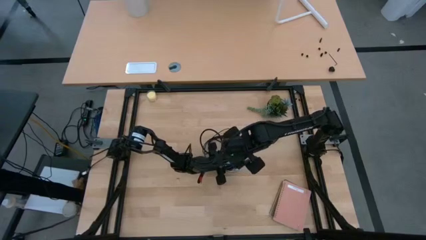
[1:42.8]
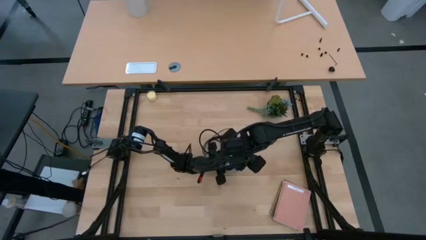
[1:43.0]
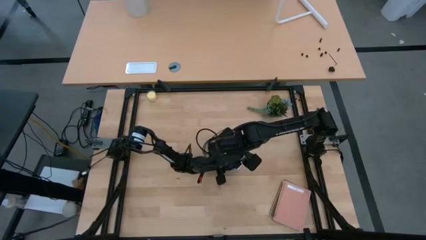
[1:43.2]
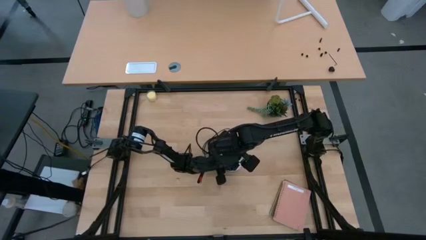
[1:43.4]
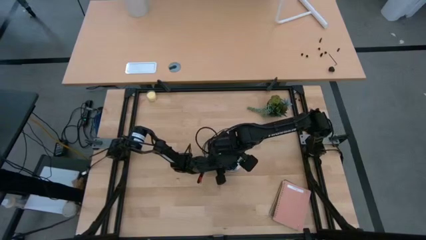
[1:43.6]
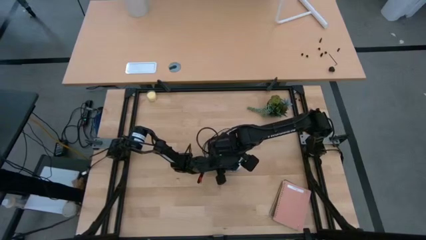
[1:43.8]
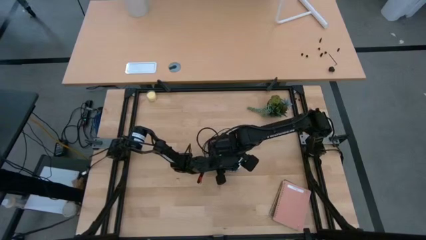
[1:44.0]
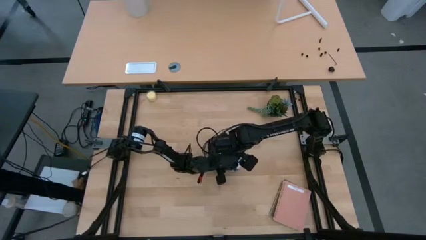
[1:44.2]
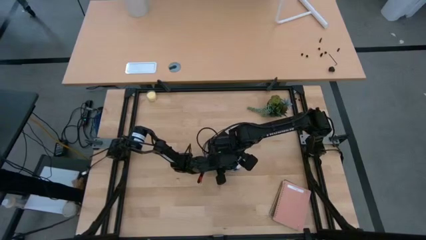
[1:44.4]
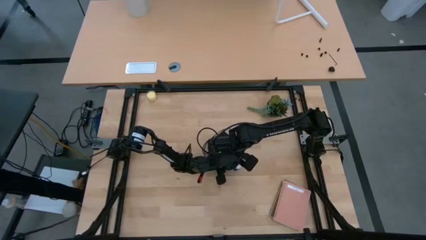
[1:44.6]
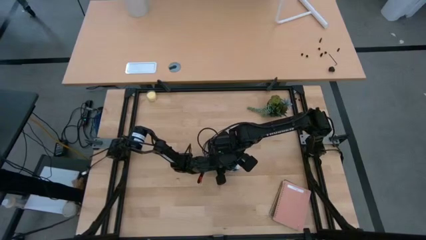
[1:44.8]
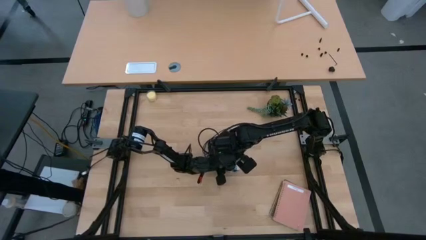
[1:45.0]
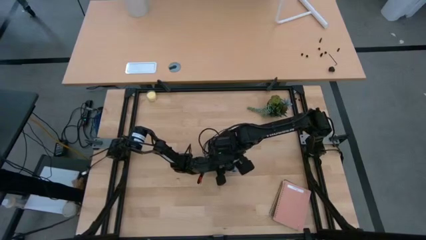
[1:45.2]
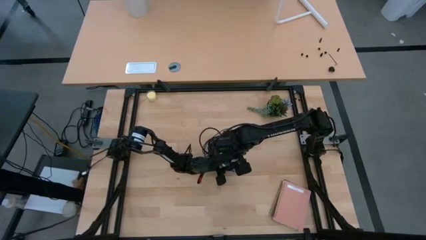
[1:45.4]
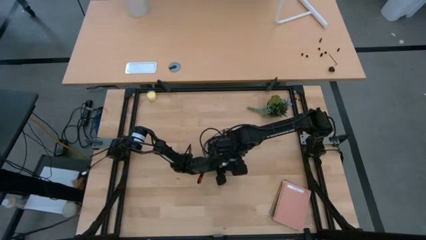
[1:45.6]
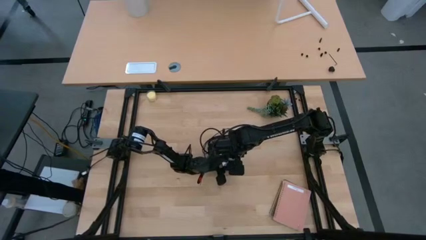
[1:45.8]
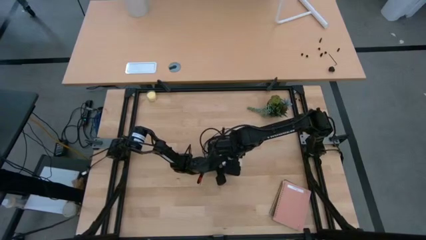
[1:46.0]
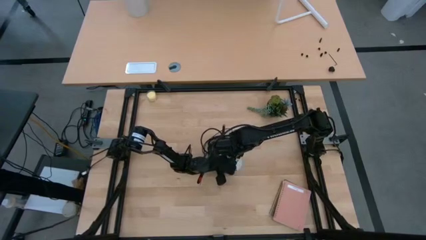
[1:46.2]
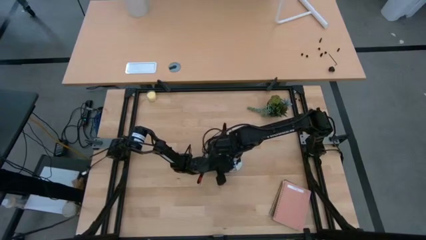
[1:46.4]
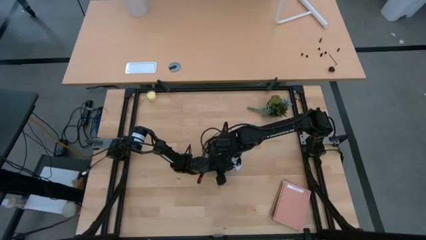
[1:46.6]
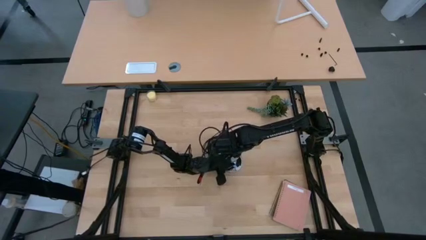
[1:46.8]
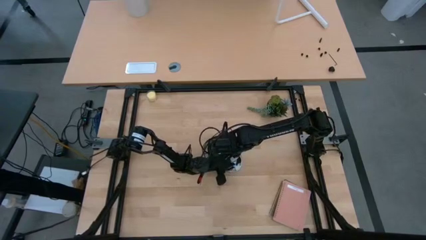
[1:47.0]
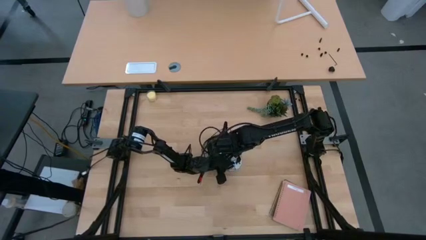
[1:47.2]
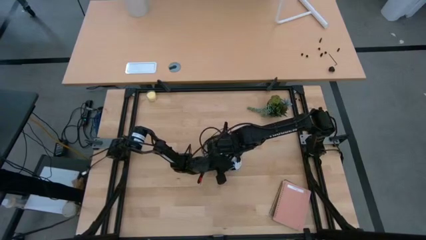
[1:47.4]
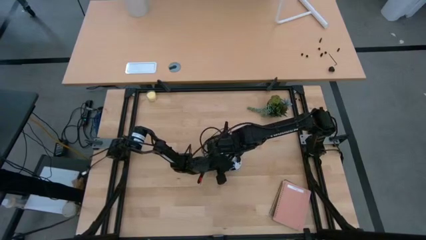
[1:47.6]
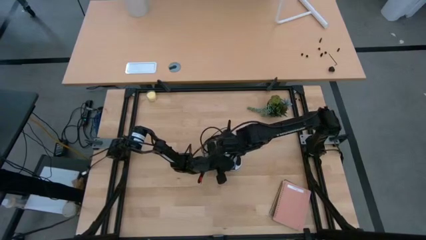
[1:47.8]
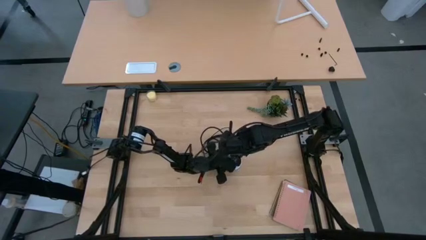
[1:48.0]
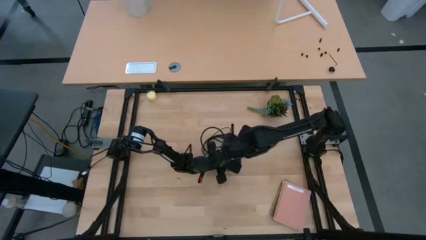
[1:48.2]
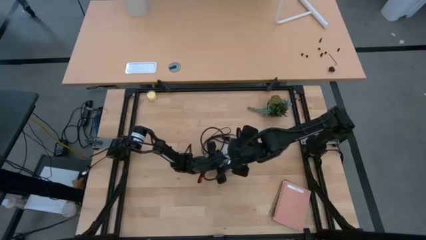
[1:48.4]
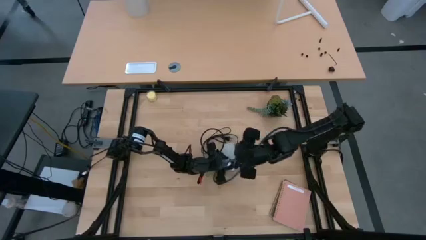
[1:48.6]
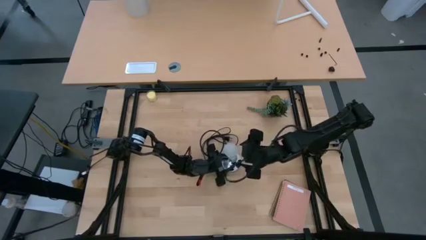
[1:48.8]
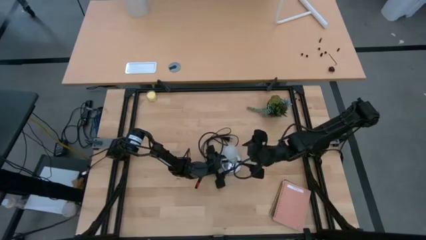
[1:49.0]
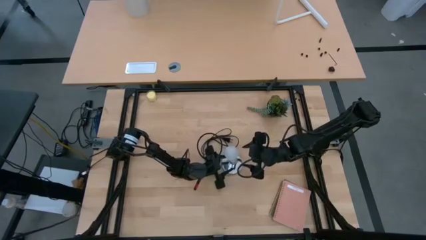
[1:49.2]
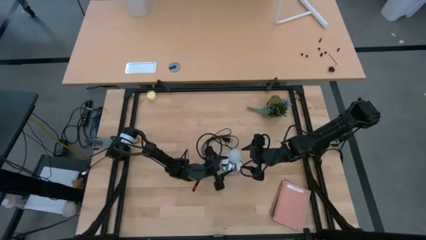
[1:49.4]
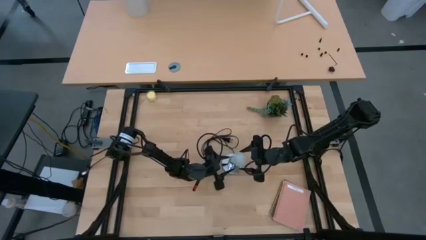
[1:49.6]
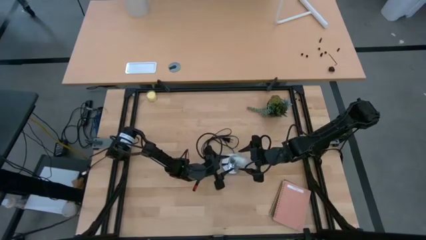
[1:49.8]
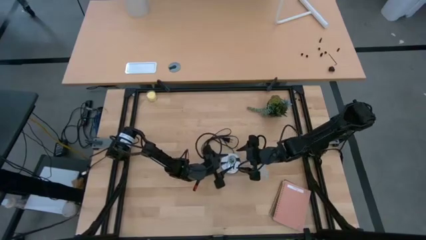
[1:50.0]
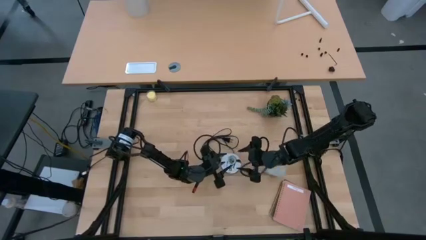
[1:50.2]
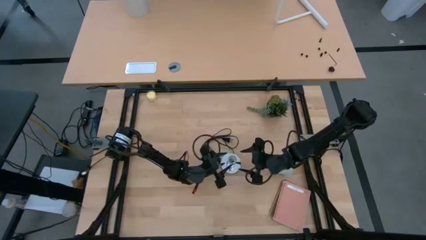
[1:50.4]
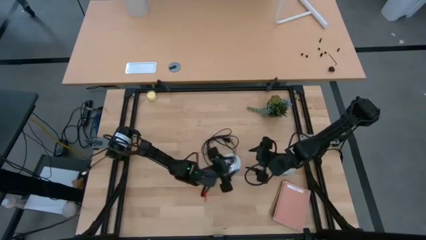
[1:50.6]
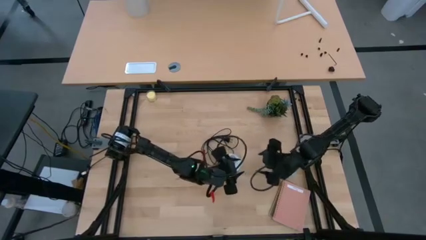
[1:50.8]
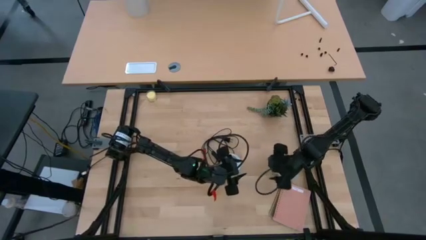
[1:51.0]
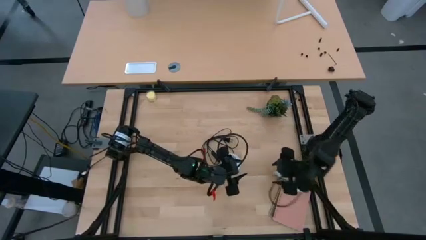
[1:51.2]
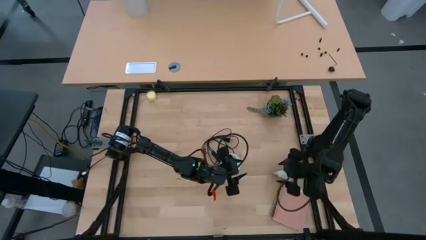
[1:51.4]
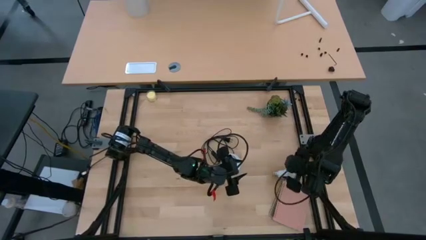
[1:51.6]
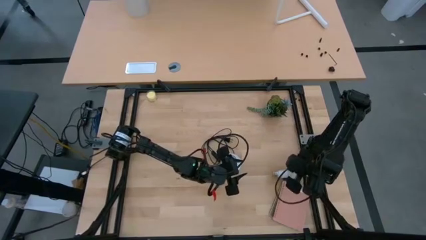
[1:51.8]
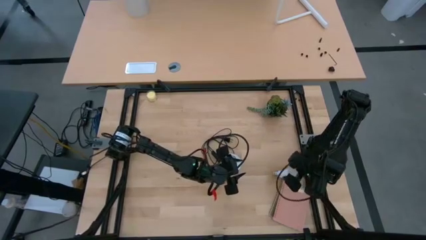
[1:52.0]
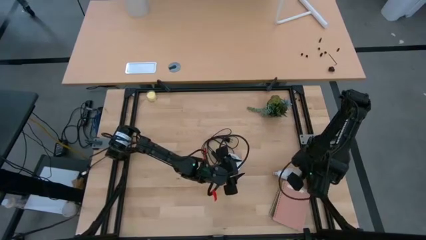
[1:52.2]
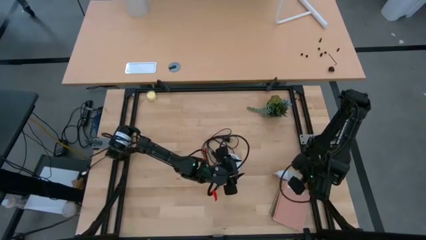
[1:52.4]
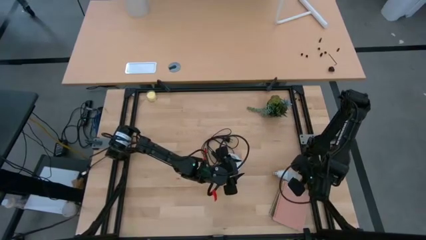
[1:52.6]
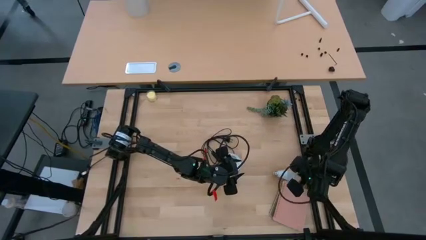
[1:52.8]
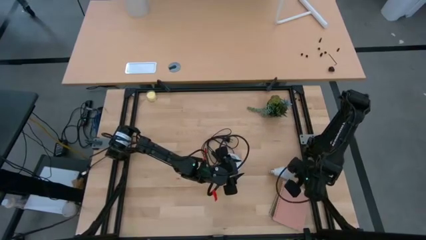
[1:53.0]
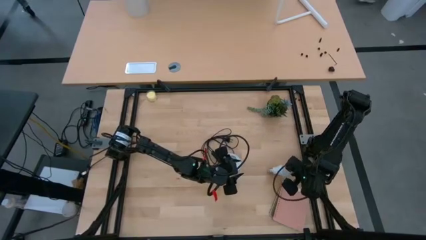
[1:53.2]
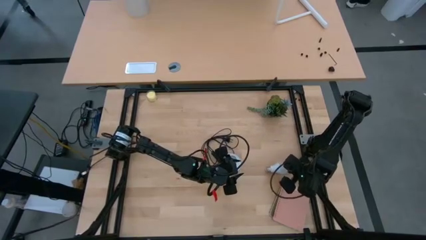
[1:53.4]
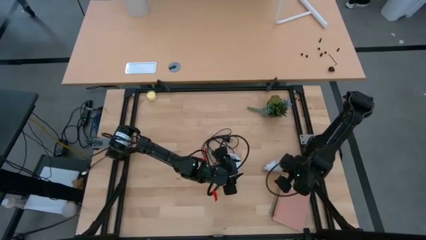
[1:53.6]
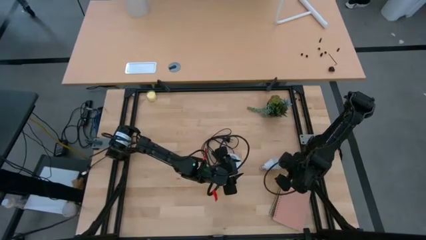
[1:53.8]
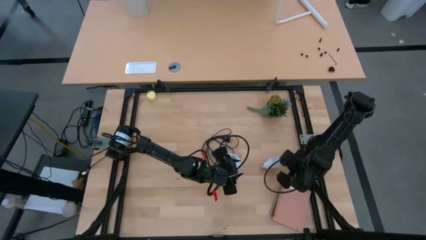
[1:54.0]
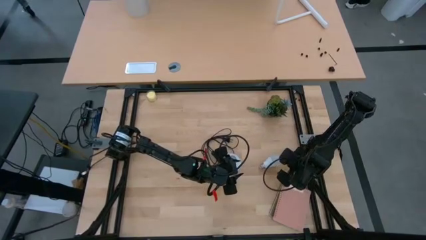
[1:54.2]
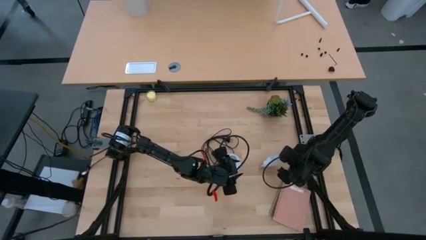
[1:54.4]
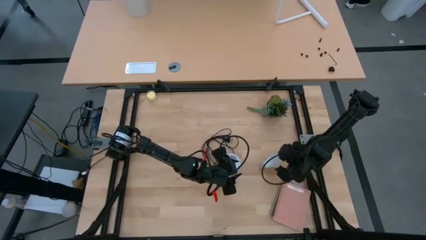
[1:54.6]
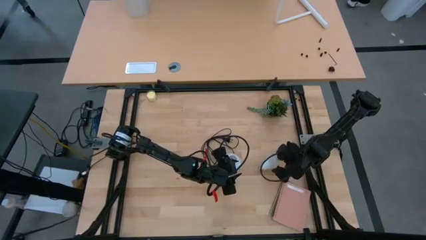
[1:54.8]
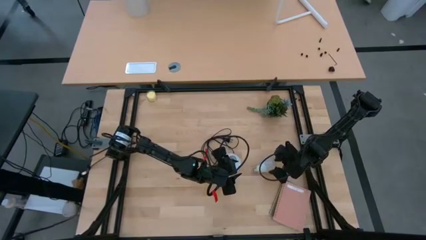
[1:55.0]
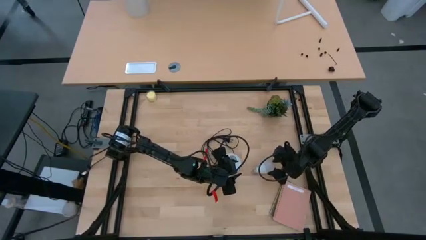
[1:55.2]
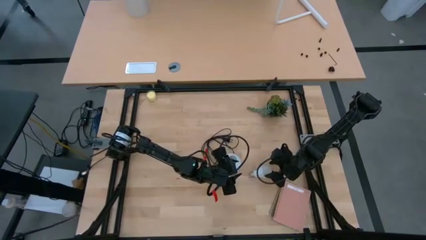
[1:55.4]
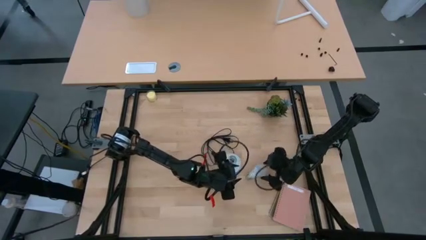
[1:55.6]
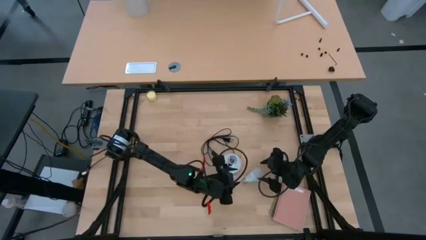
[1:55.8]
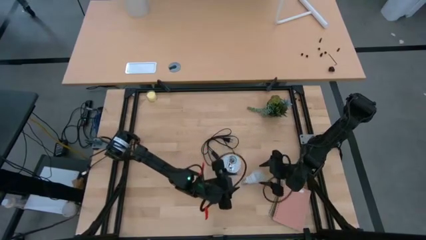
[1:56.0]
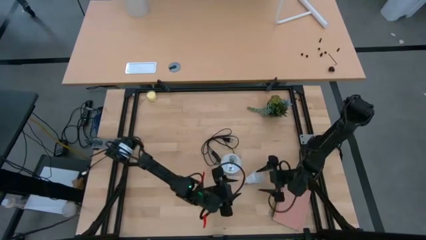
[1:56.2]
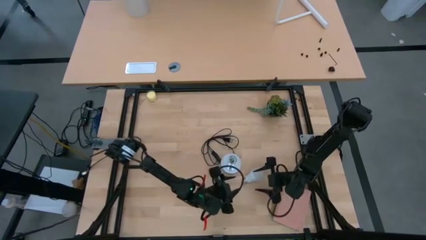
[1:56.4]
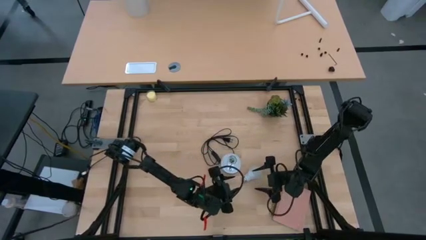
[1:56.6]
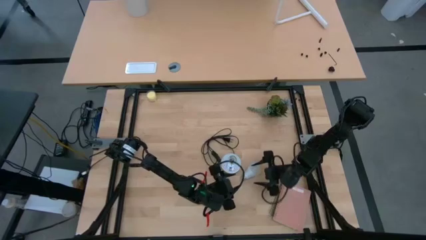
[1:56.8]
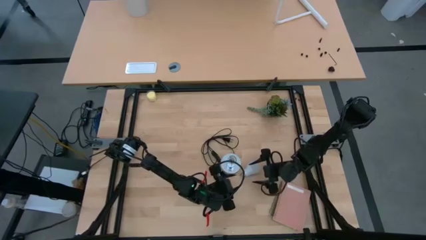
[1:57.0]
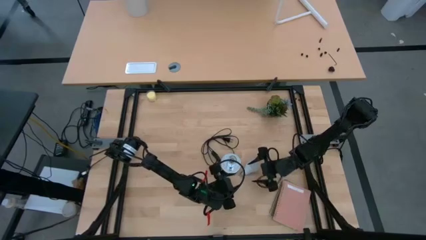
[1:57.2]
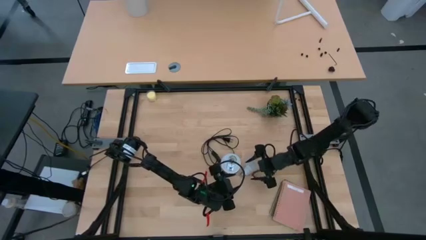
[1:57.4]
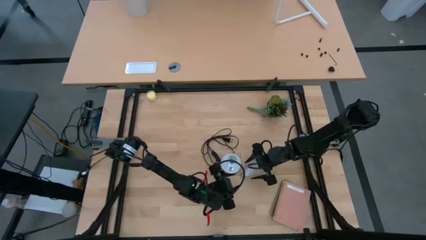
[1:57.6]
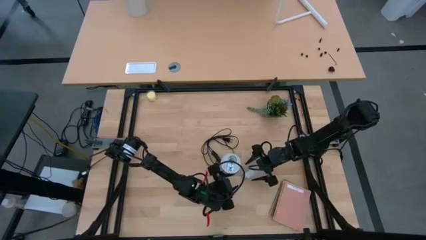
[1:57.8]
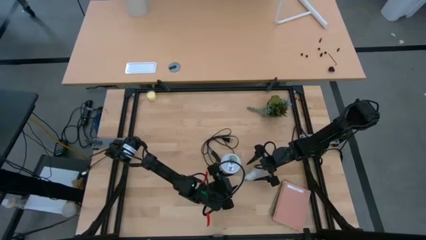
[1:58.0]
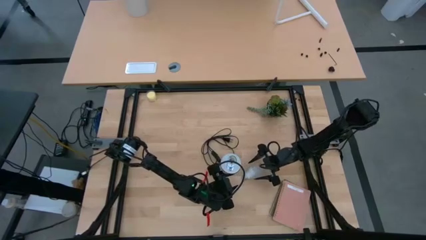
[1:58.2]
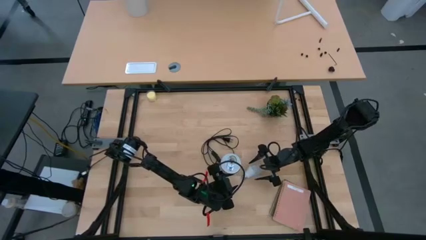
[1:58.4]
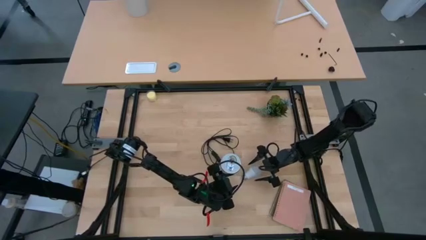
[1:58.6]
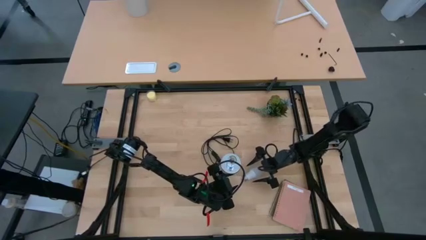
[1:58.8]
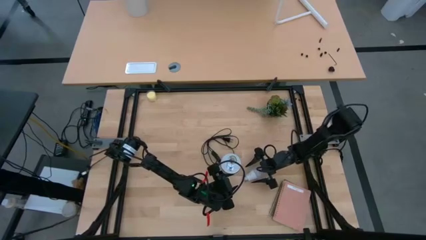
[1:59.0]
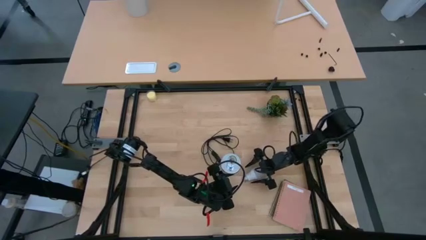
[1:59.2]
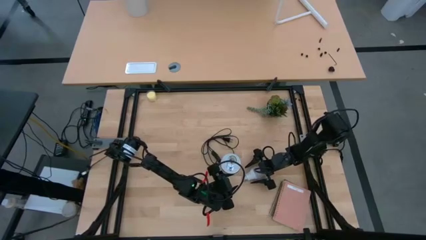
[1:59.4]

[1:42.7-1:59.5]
Task: Screw lightbulb
Insert the white lightbulb into the metallic lamp
